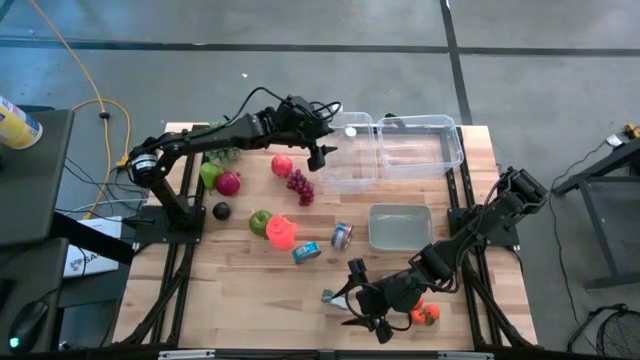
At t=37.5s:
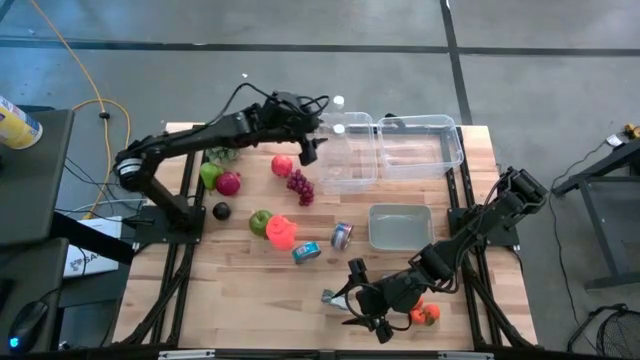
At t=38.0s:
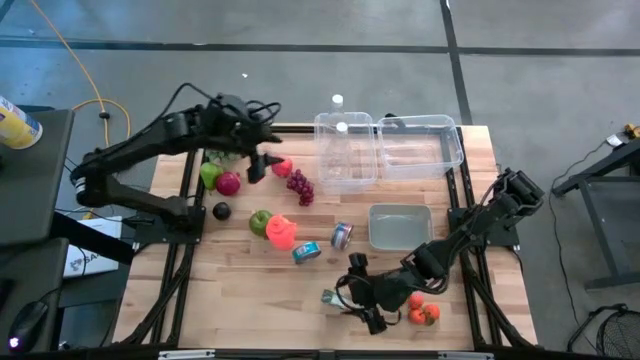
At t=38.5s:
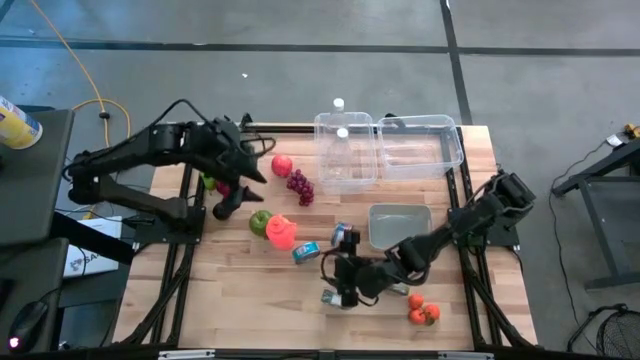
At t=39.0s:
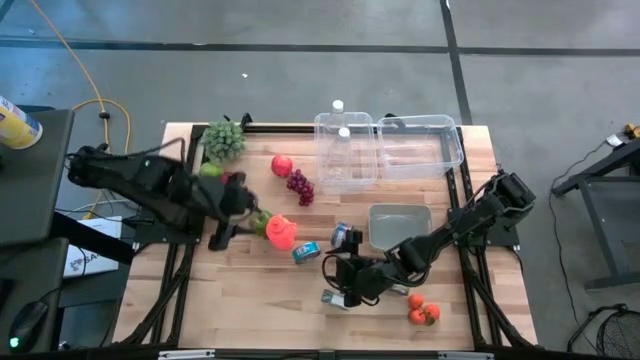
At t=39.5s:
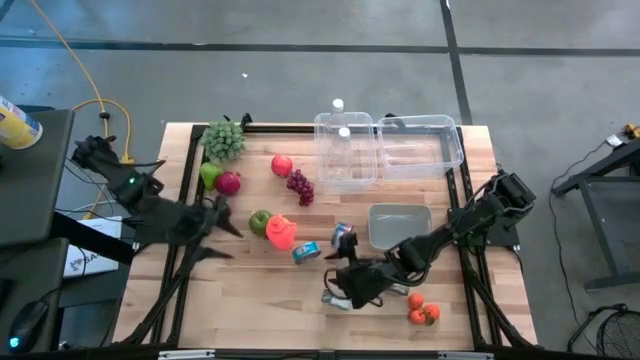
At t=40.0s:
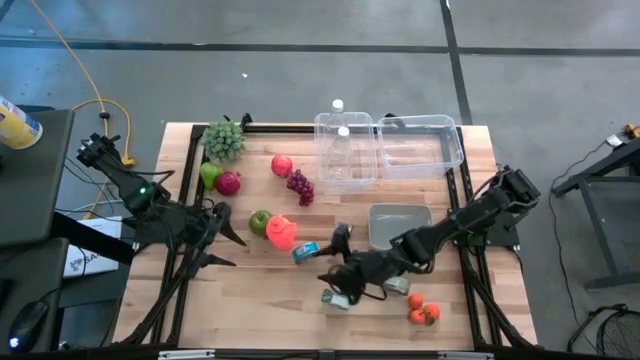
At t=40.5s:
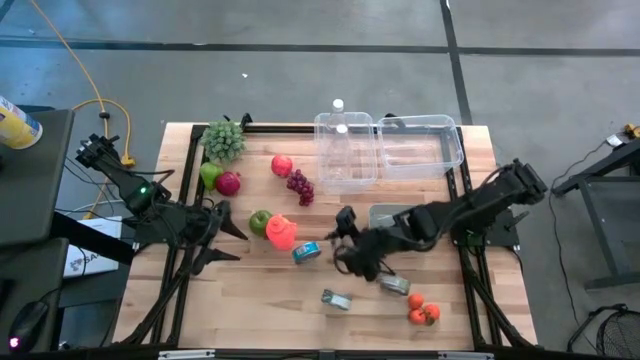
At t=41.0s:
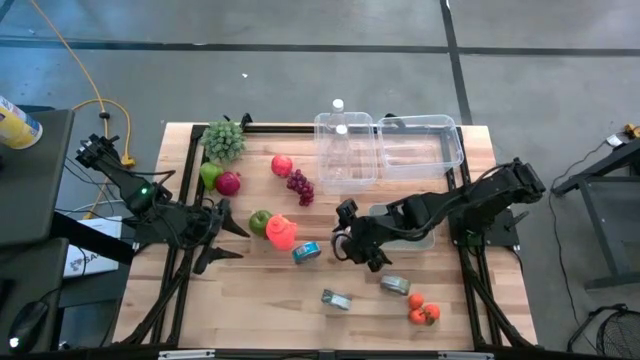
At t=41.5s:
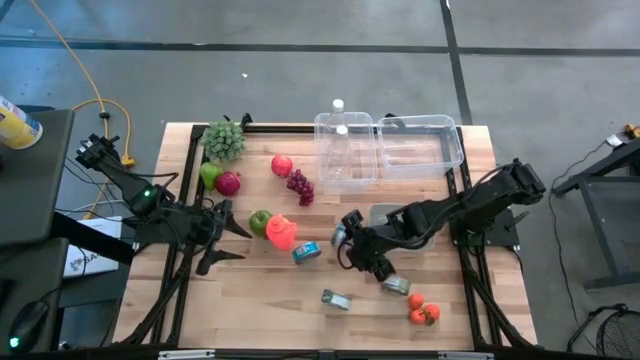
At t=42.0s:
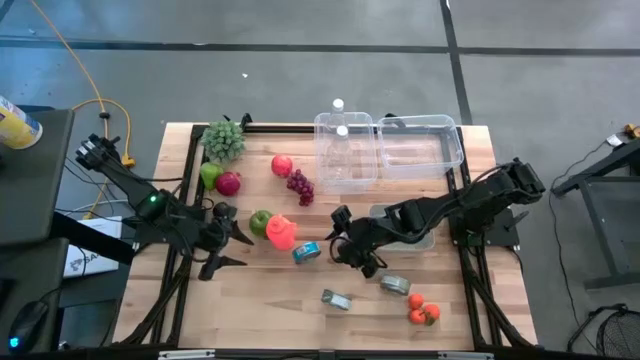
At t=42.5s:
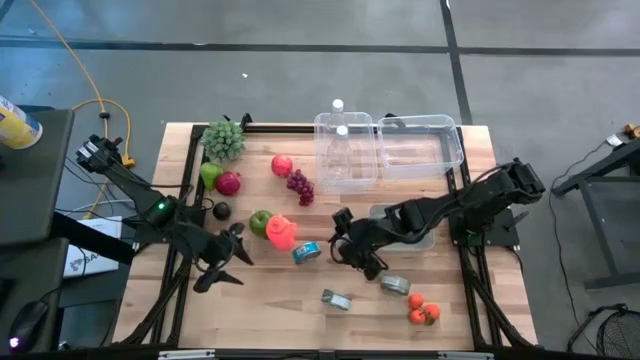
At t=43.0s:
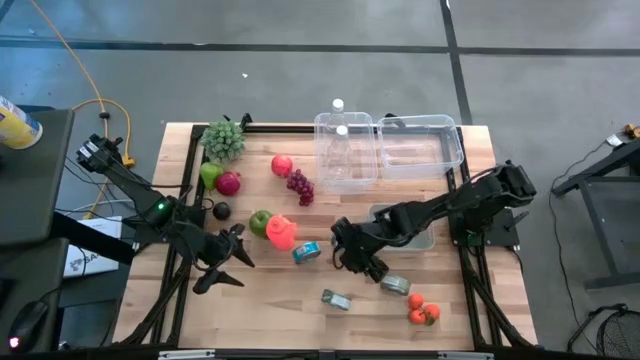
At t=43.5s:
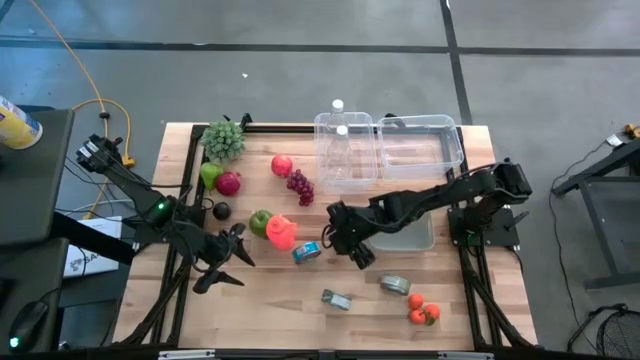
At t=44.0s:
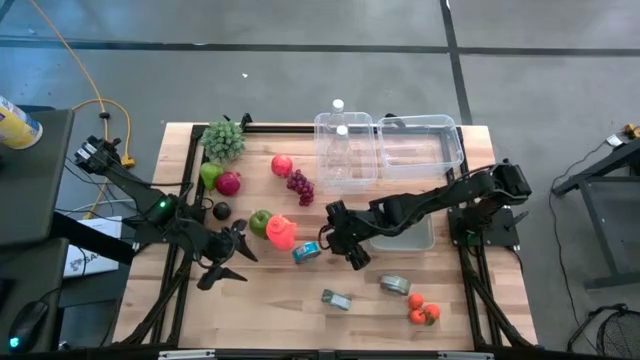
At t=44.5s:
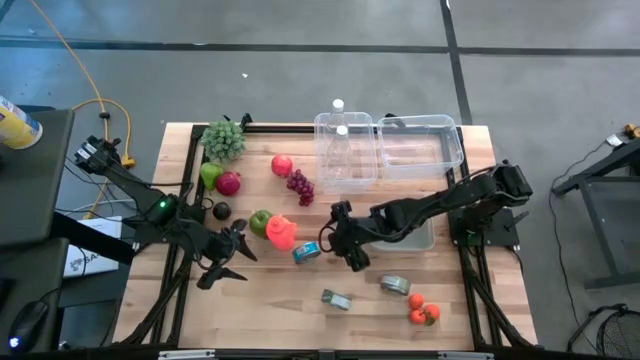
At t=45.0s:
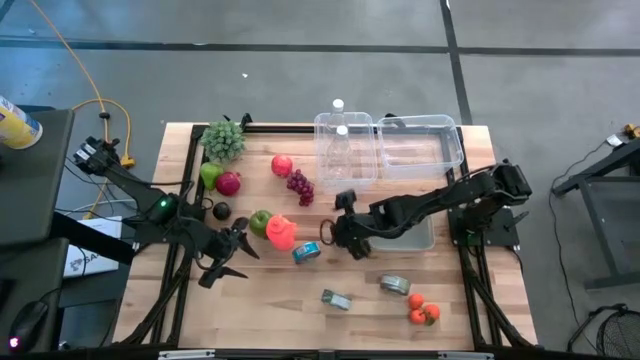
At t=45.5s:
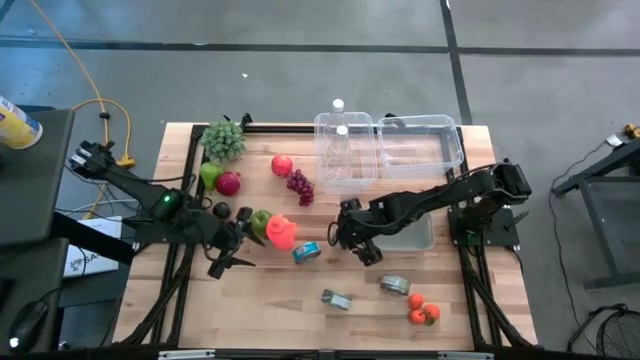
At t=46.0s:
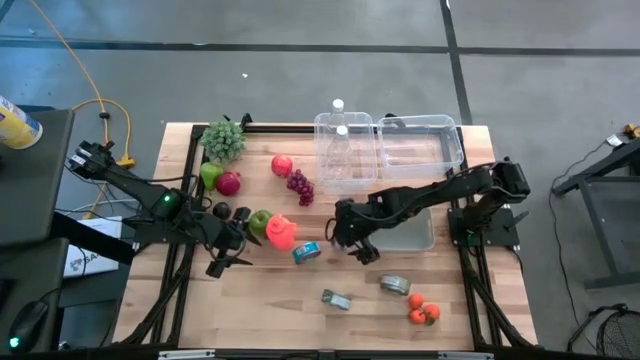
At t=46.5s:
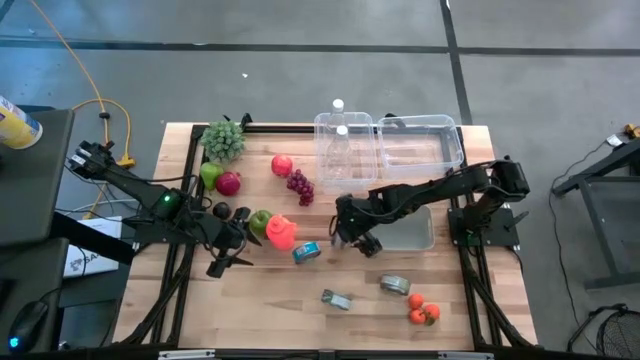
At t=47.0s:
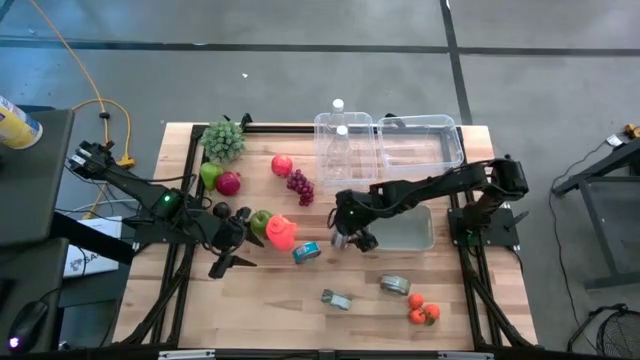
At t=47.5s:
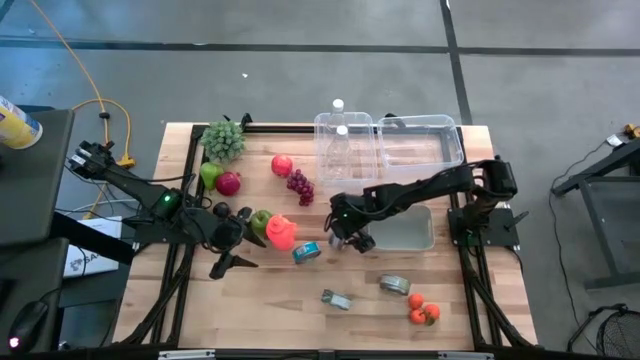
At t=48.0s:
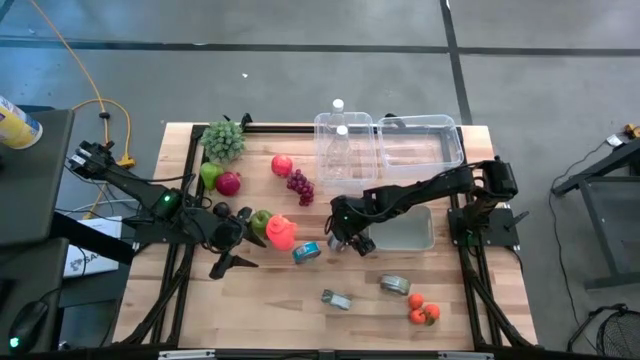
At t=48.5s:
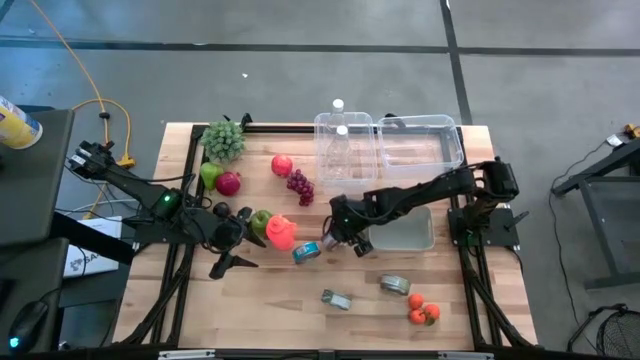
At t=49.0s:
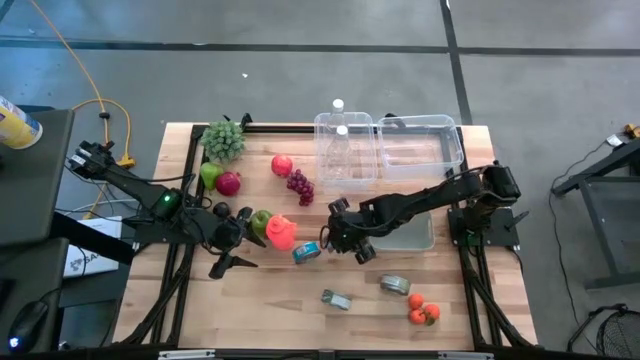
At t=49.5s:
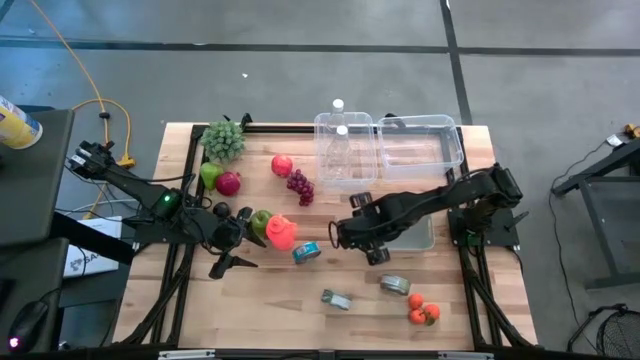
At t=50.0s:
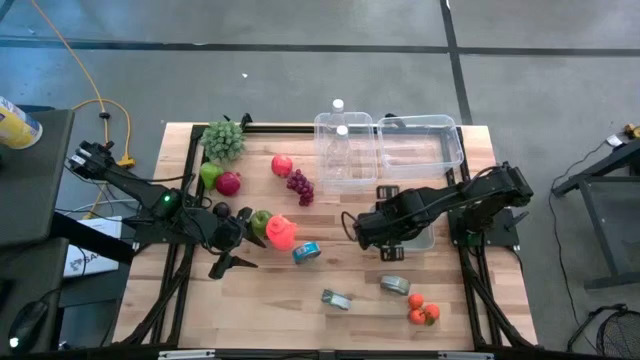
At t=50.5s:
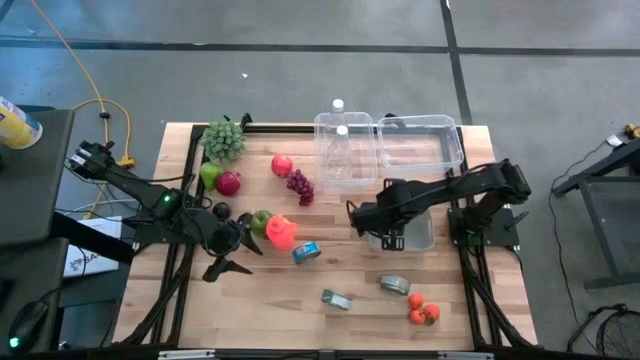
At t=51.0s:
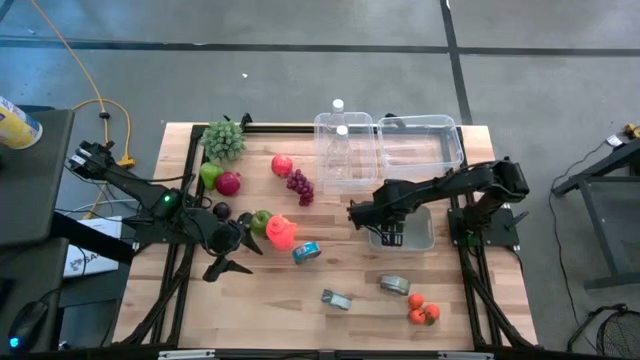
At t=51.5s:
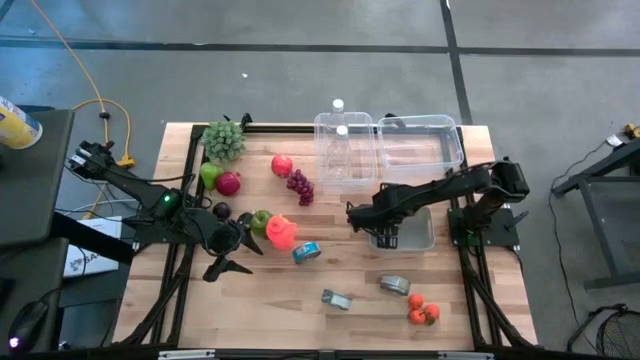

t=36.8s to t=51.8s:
Task: Pick & Place Food Item
Put the blue pink tuna can into the gray bin

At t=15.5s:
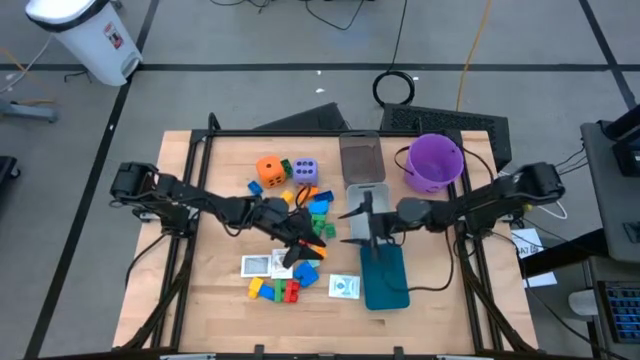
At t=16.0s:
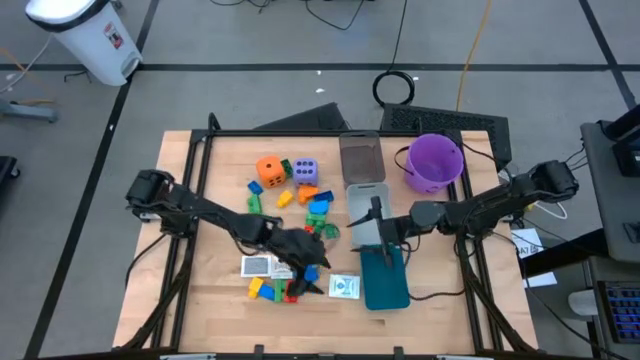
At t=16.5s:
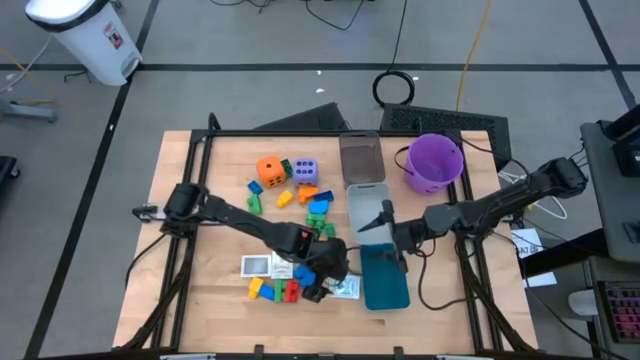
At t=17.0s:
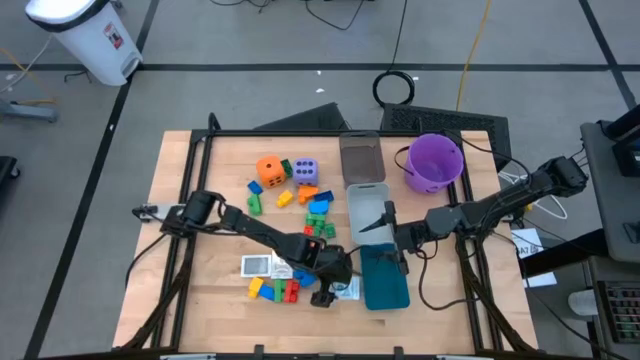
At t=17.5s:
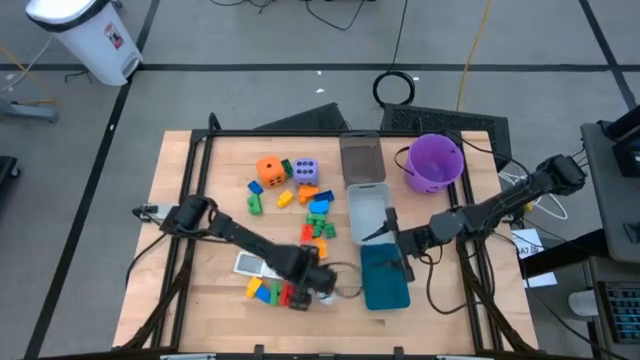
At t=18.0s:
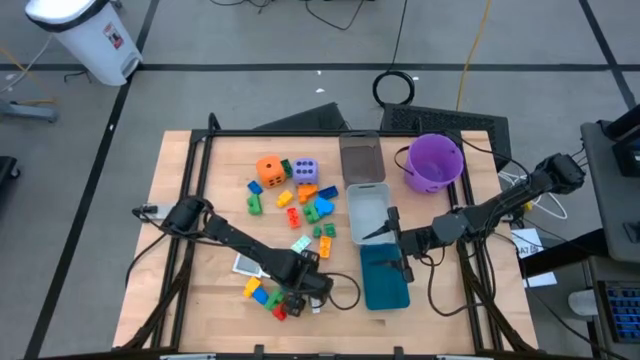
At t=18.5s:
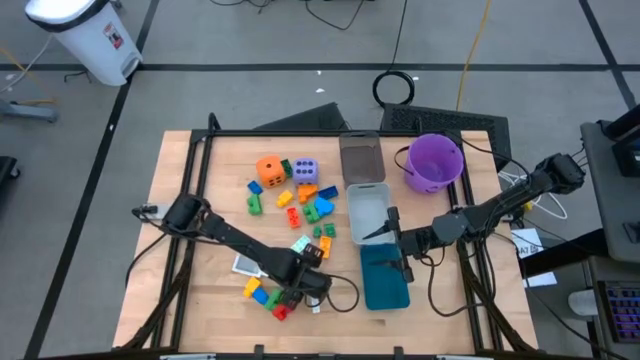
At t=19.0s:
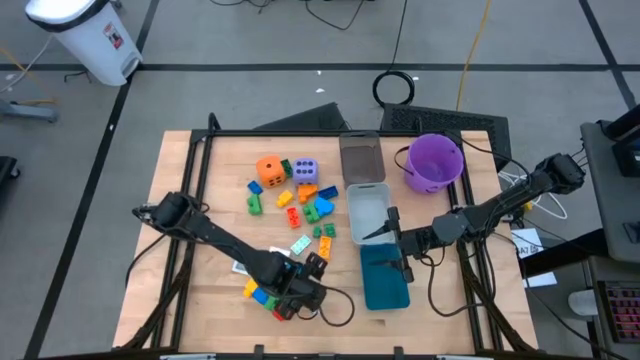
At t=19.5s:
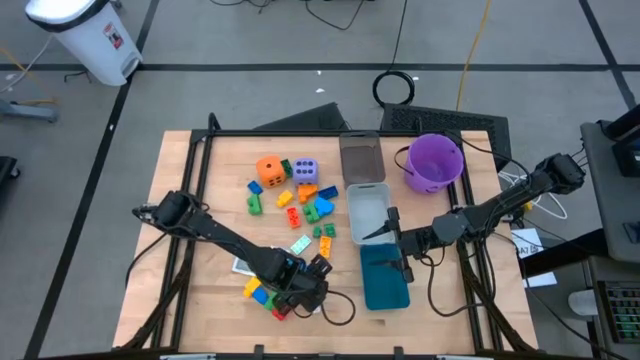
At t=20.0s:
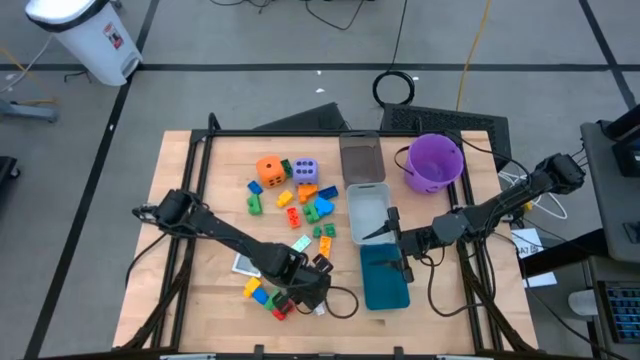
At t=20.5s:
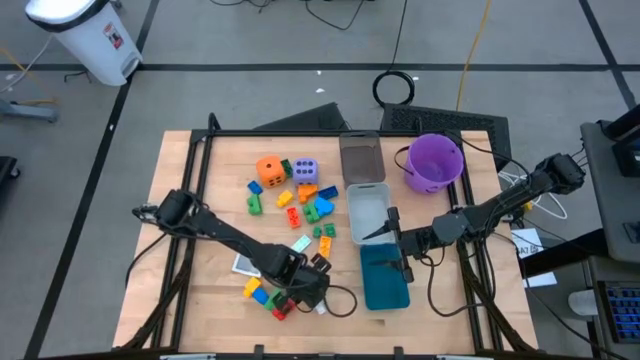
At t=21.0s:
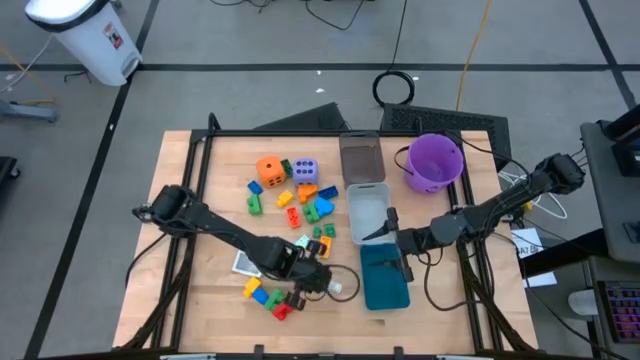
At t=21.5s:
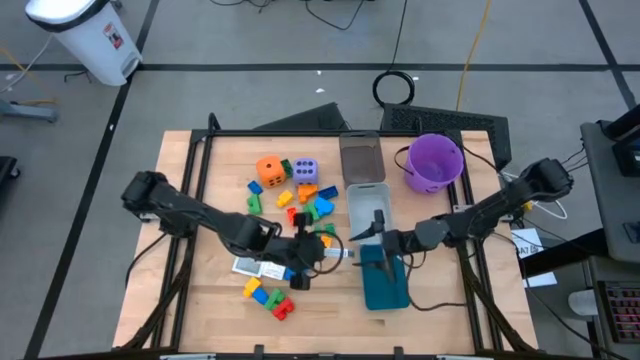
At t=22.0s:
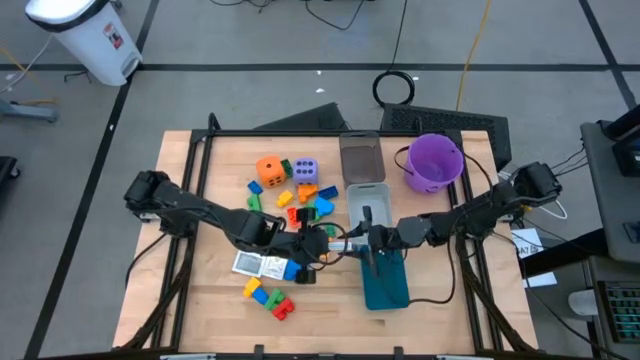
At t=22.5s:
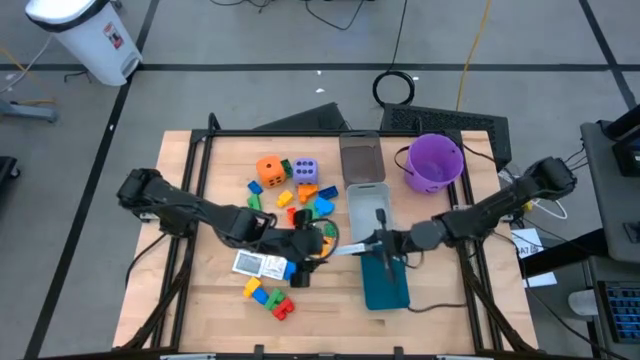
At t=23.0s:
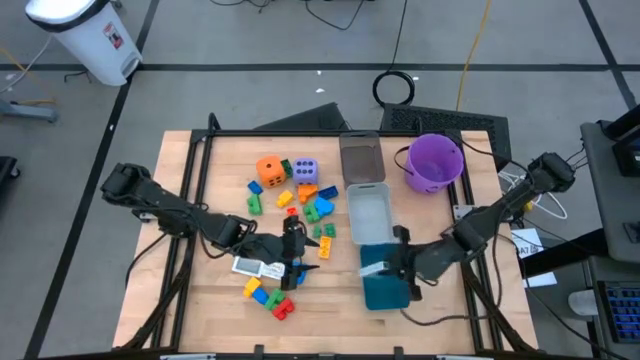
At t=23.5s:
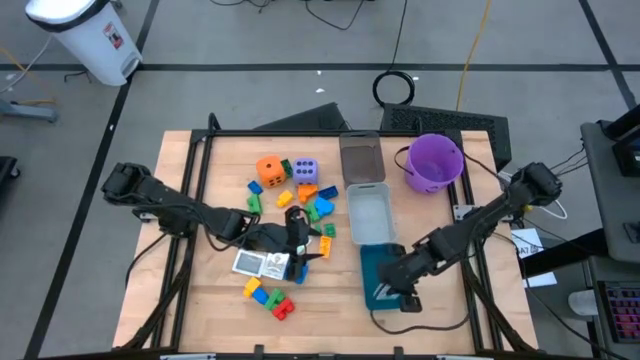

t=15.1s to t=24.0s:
Task: Pick & Place Toys
Put the blue deck of cards into the blue bin
